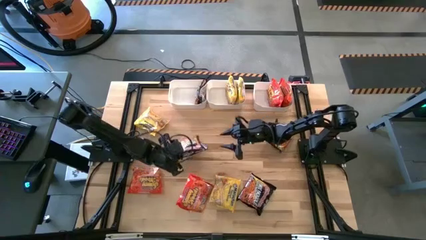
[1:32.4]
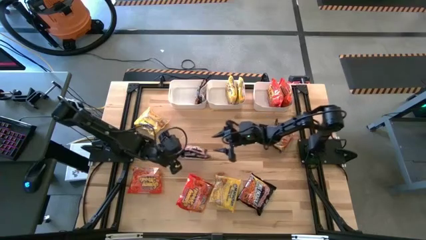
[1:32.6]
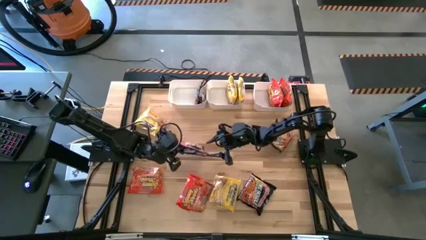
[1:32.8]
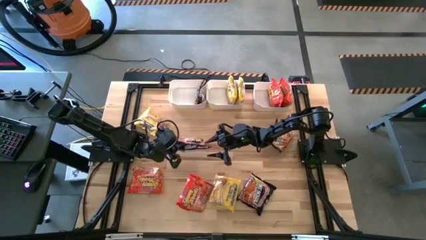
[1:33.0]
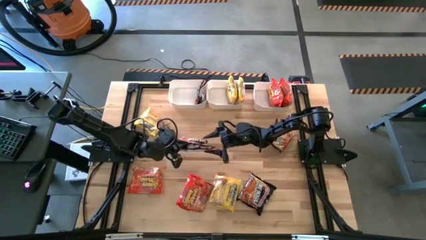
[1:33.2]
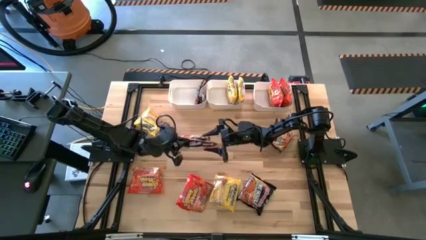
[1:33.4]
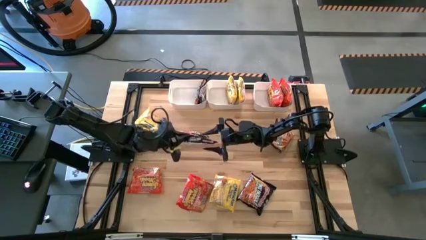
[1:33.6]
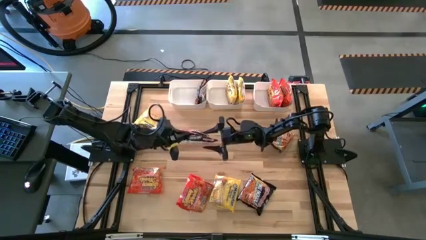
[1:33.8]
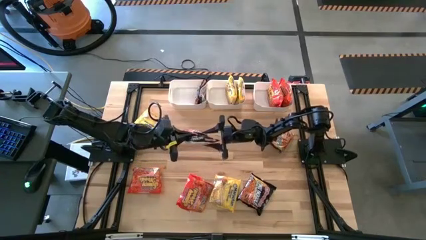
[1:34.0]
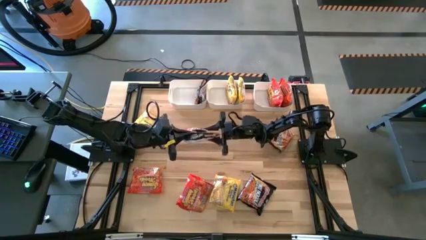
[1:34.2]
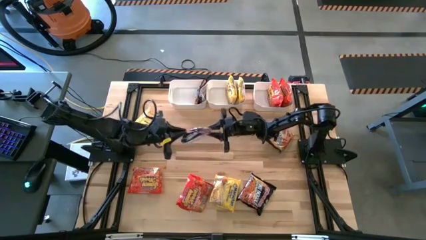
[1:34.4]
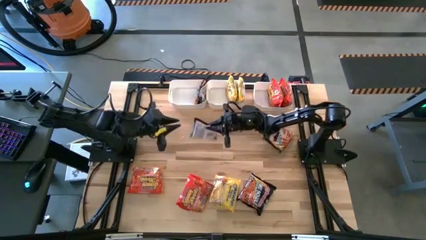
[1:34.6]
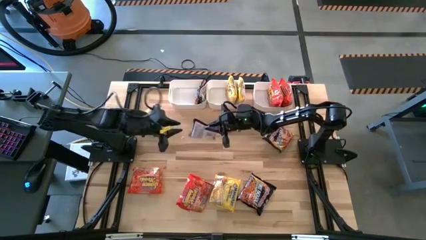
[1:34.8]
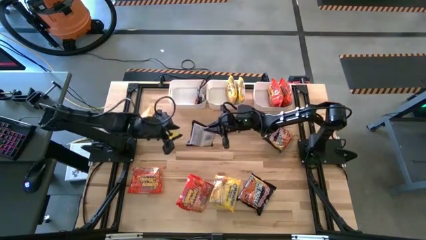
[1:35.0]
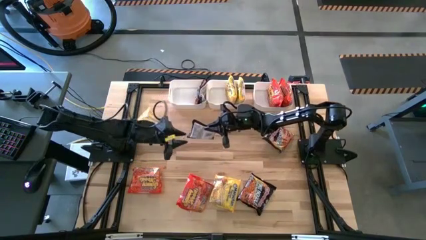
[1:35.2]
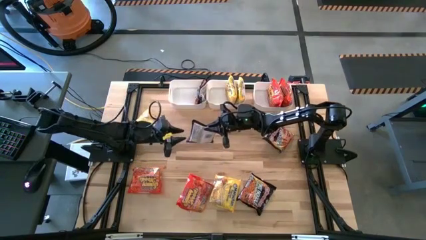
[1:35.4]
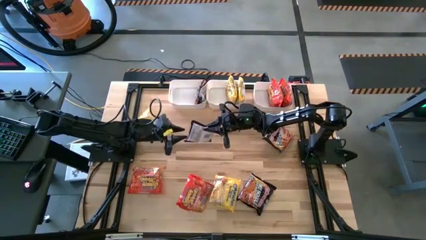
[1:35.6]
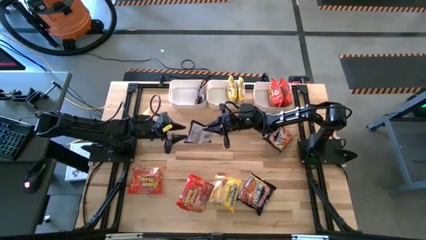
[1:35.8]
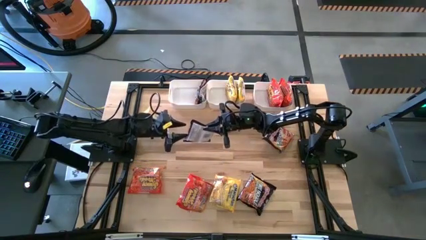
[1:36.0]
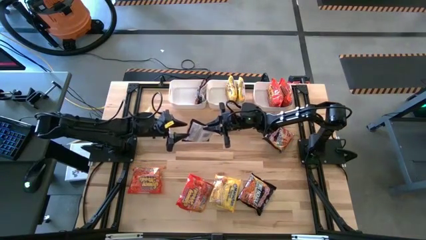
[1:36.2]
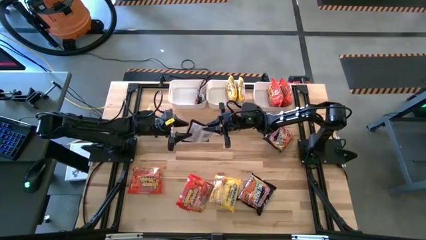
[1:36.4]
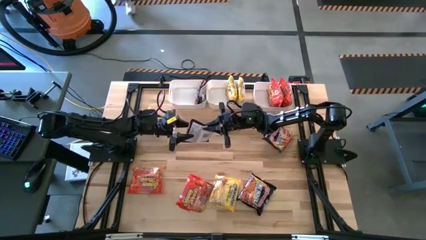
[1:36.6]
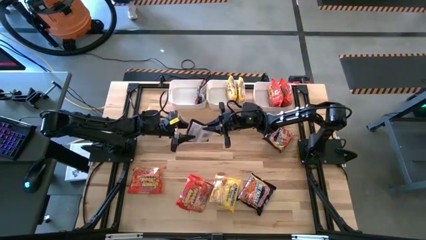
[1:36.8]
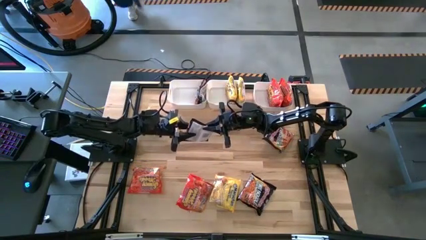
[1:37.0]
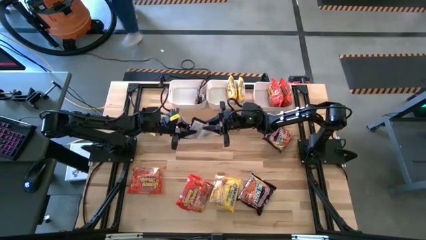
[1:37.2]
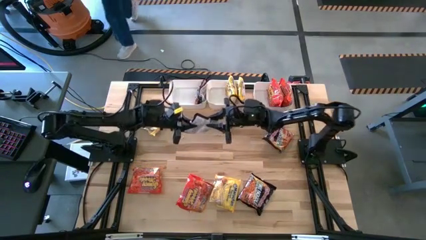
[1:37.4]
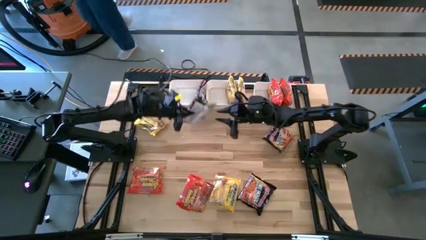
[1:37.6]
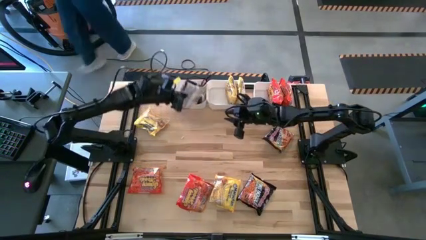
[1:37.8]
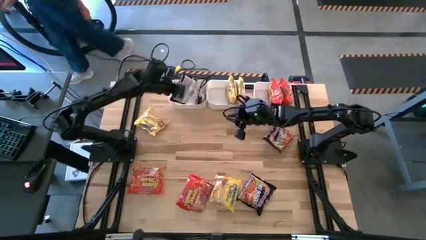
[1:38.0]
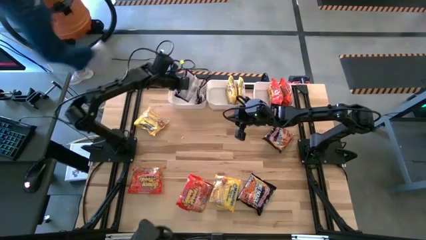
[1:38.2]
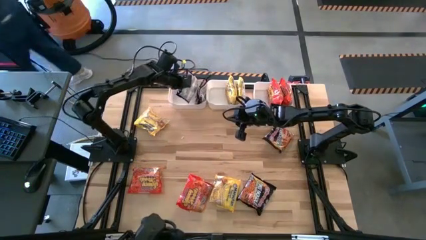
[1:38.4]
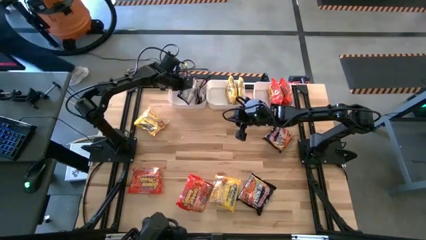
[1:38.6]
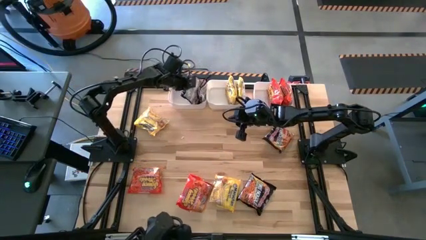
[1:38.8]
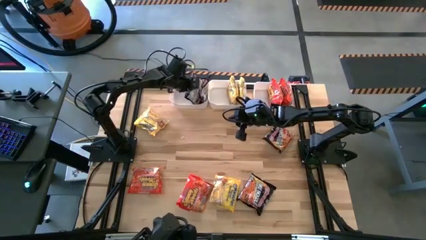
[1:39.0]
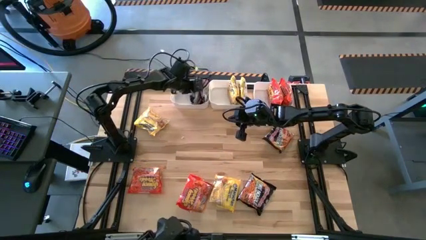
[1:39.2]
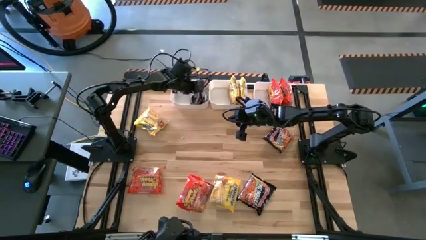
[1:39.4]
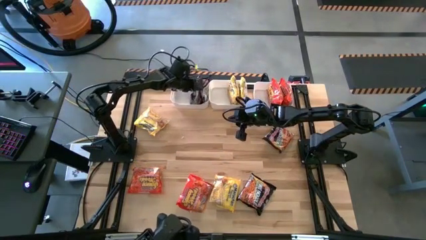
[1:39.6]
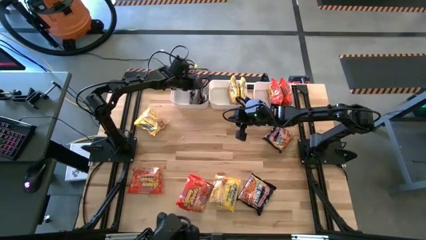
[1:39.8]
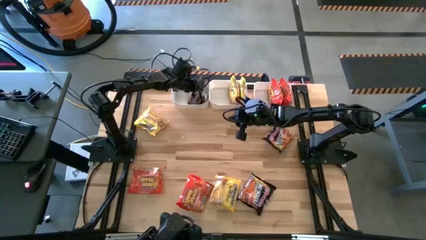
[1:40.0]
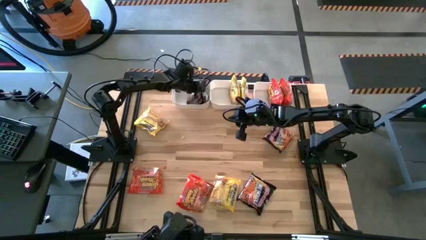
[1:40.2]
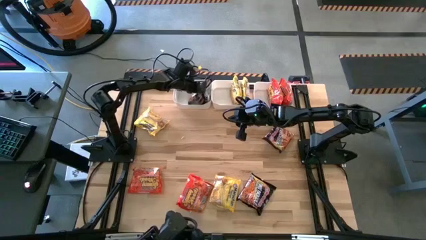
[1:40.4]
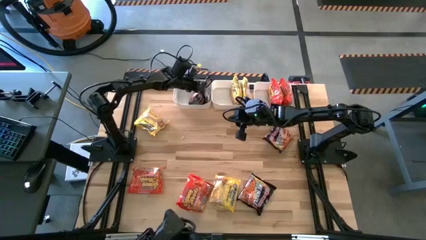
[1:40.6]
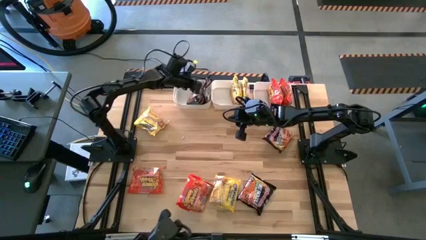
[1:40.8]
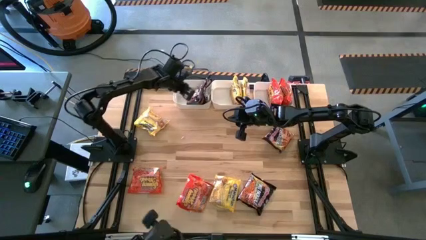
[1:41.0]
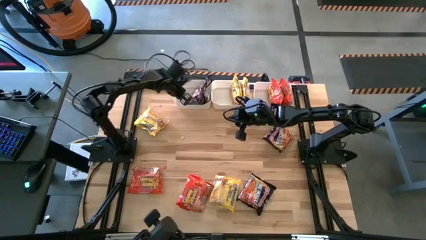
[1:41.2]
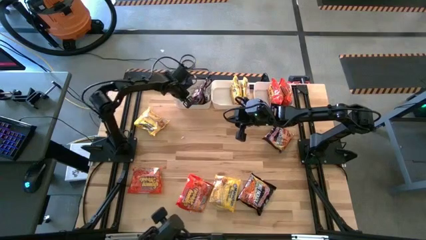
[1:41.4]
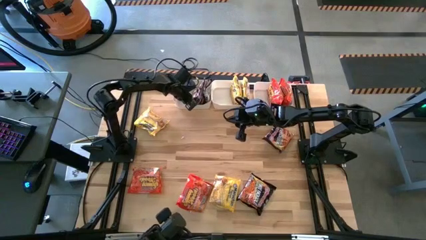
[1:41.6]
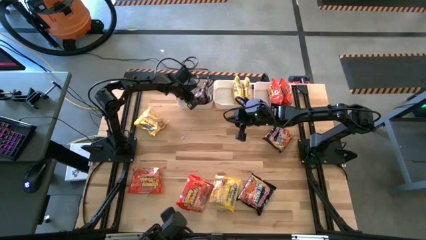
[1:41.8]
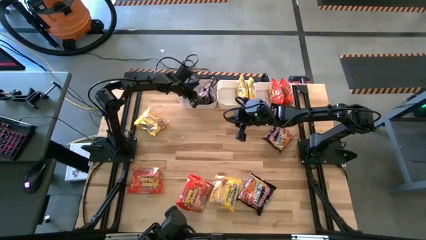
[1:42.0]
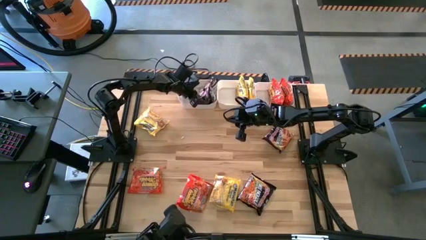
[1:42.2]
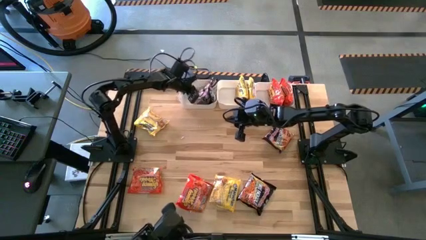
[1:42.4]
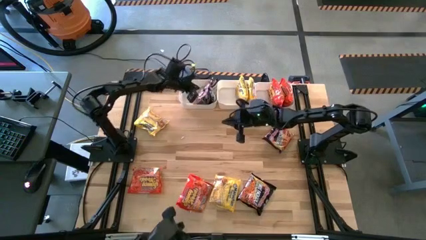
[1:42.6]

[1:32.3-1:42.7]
Task: Sort Maruchan noodles
Put the black noodle into the left white bin

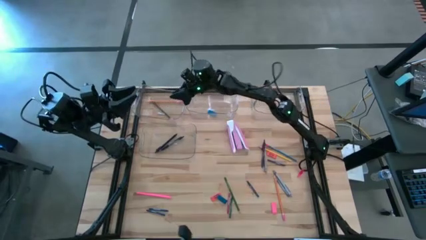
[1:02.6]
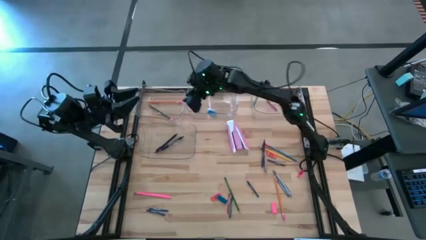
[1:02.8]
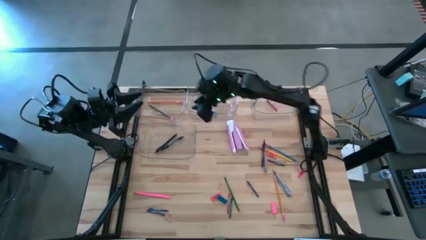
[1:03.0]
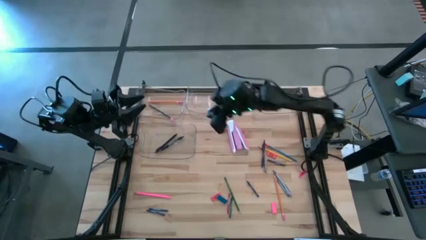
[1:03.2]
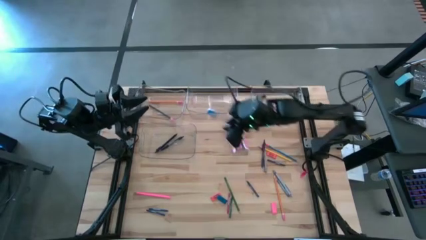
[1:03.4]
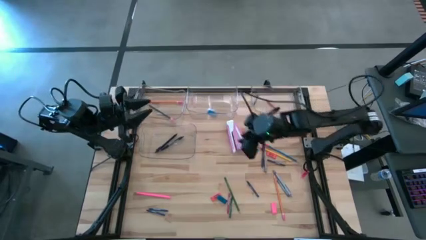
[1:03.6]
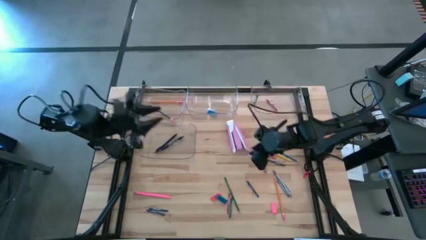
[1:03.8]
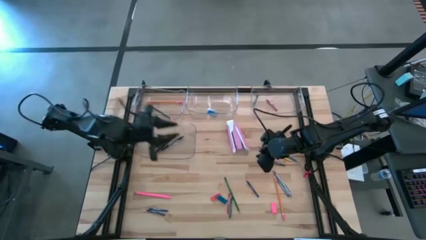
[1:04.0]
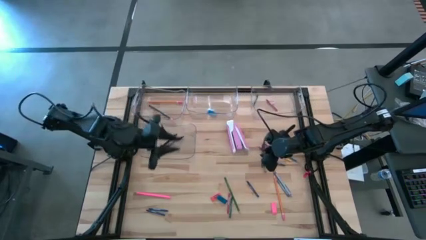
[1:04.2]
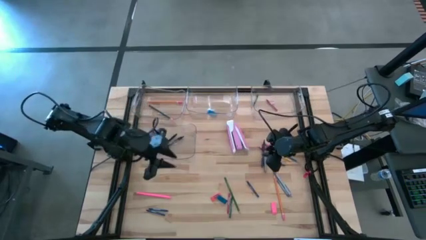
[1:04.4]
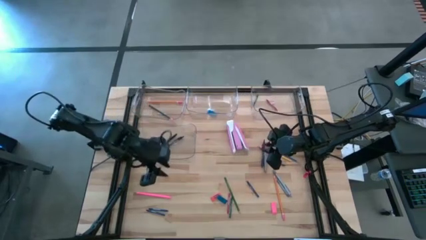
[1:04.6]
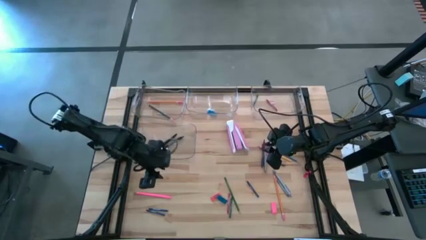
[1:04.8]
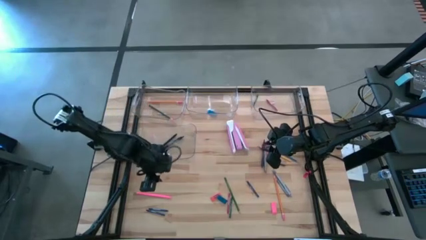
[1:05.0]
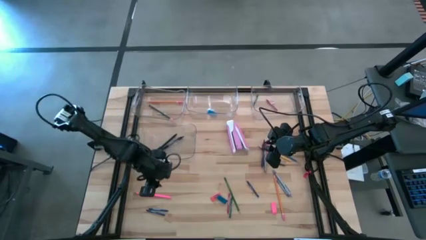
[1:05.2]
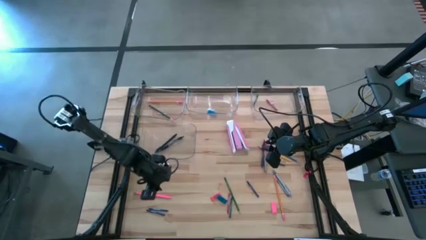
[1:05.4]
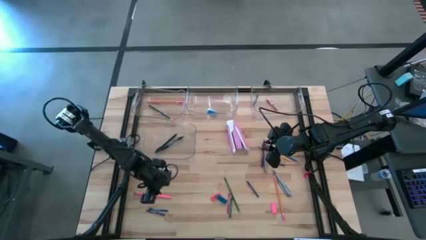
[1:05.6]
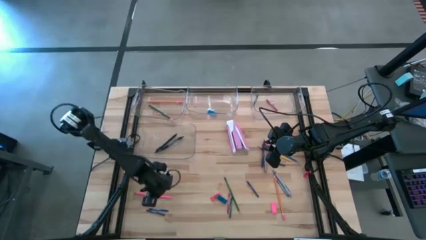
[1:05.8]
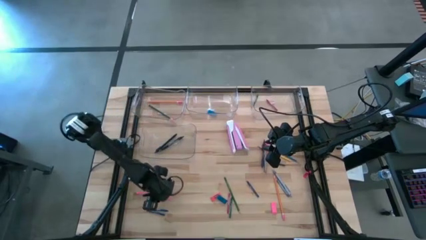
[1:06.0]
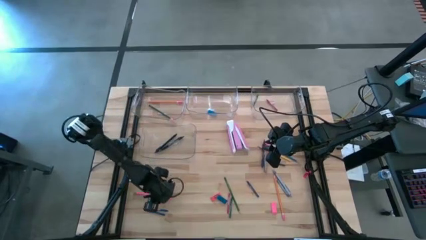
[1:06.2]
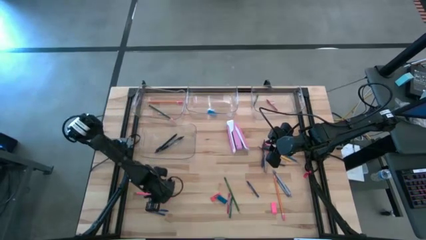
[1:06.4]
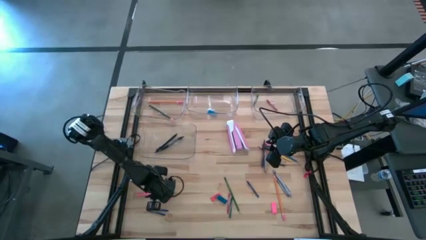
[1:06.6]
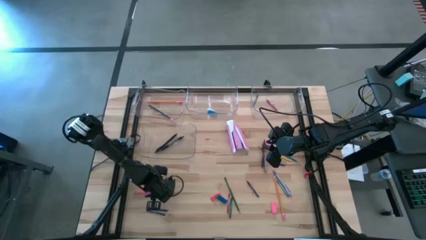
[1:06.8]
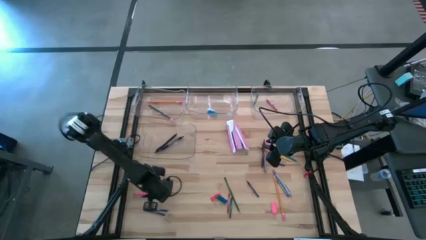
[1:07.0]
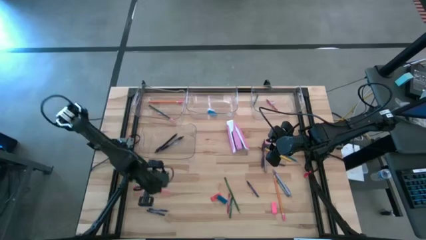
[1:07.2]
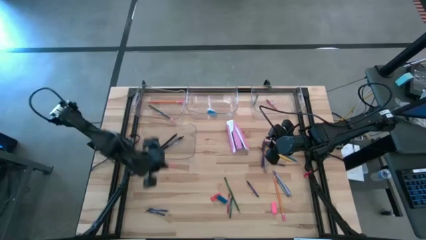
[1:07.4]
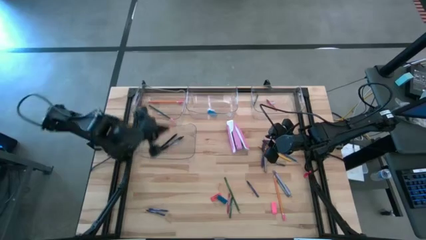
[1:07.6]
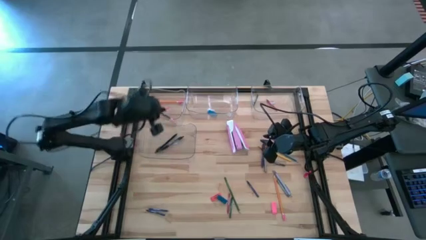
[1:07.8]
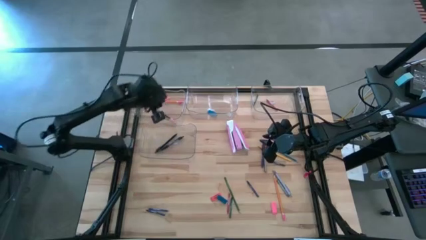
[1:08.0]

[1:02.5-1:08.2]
Task: Sort crayons/erasers/pens/pencils in bins
Put the pink pencil into the top left transparent bin
